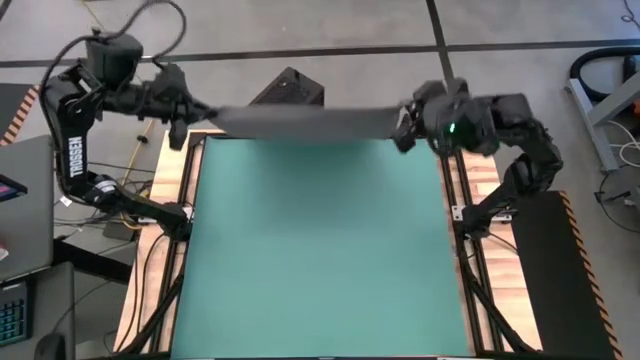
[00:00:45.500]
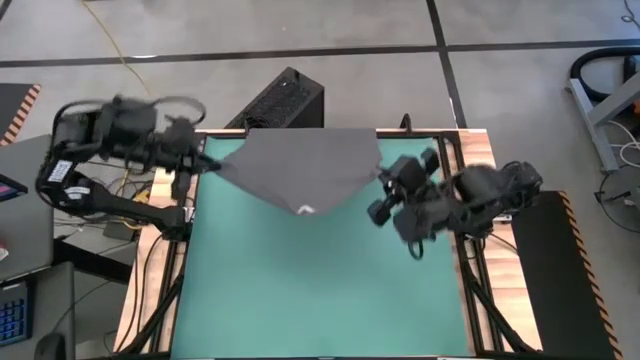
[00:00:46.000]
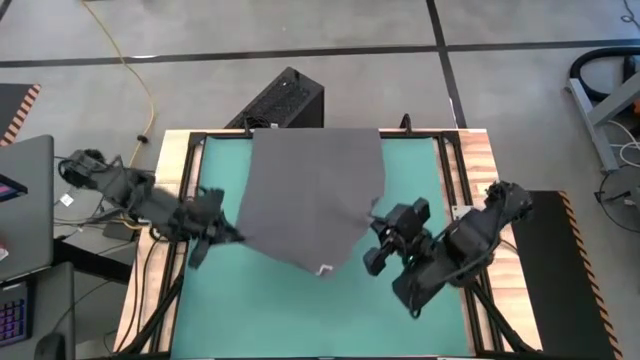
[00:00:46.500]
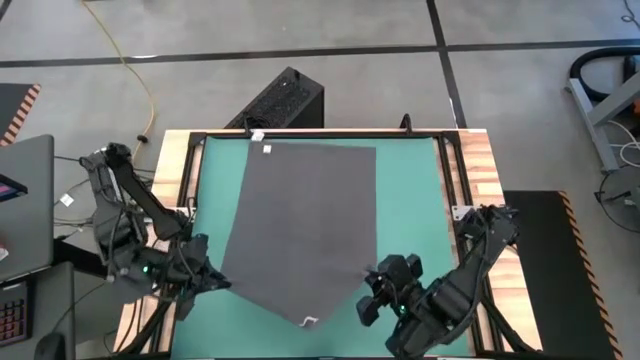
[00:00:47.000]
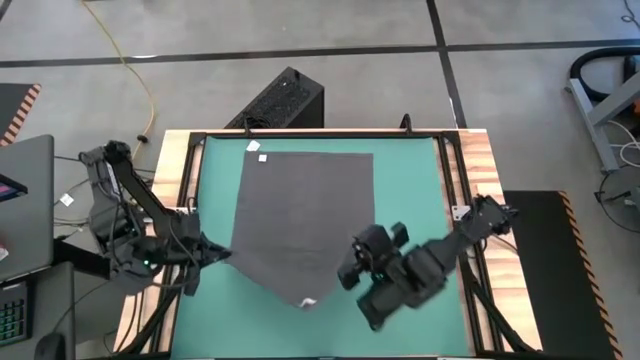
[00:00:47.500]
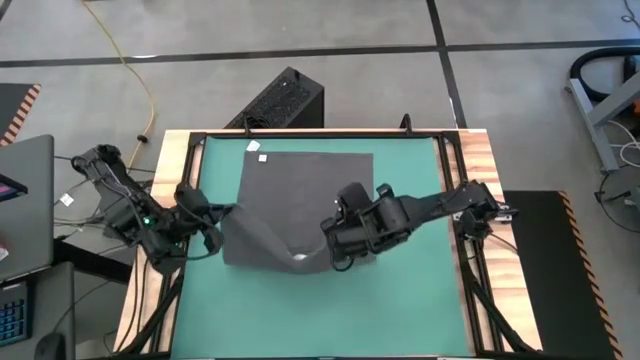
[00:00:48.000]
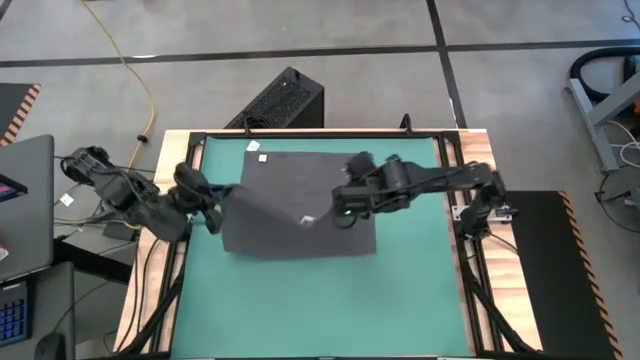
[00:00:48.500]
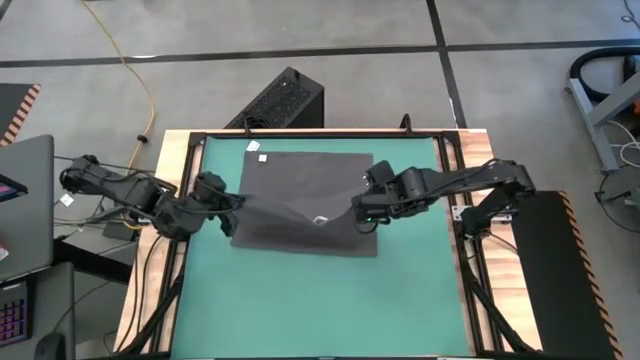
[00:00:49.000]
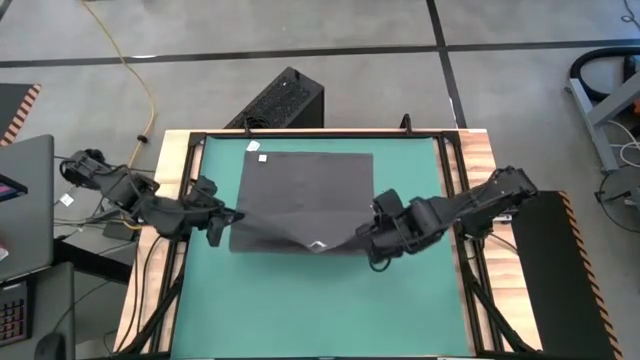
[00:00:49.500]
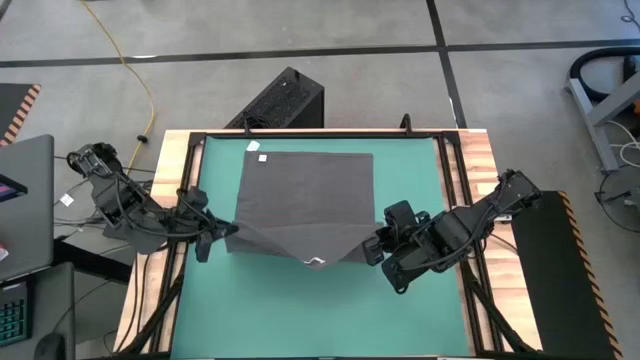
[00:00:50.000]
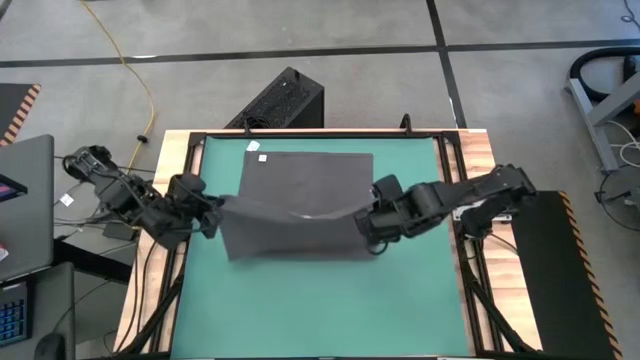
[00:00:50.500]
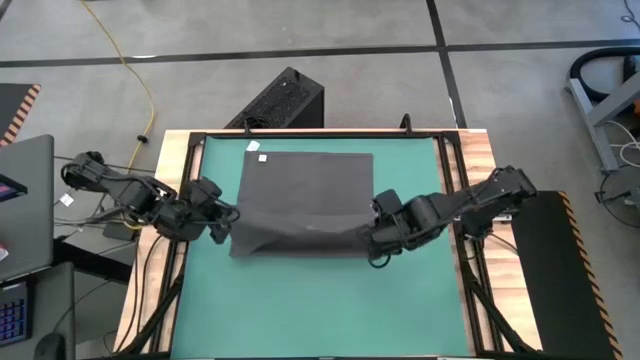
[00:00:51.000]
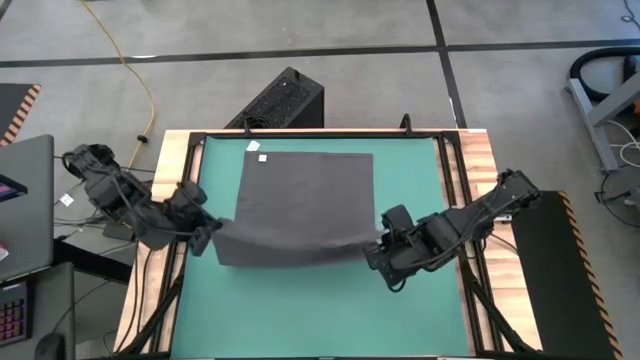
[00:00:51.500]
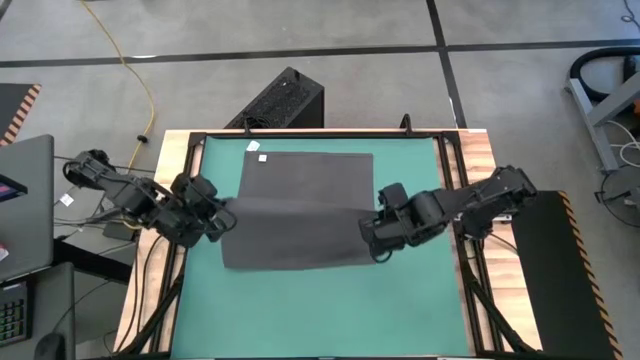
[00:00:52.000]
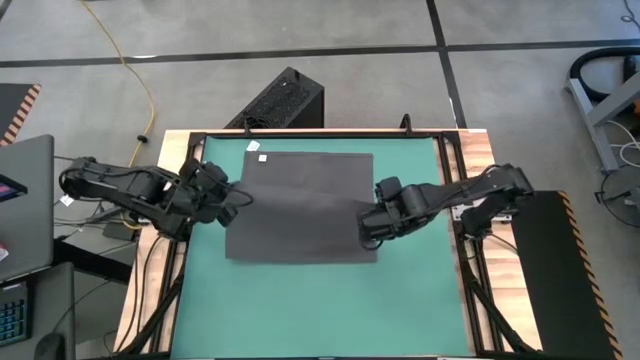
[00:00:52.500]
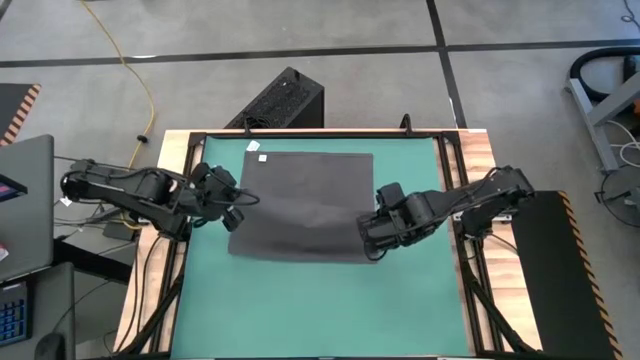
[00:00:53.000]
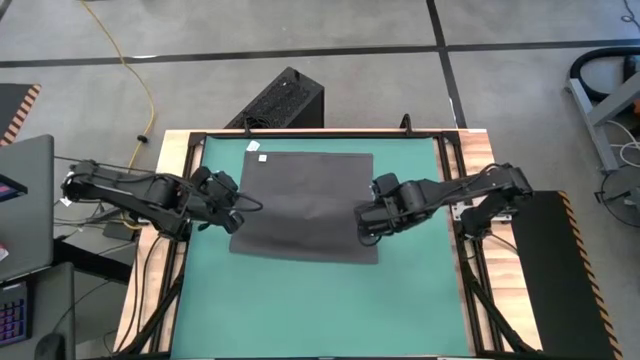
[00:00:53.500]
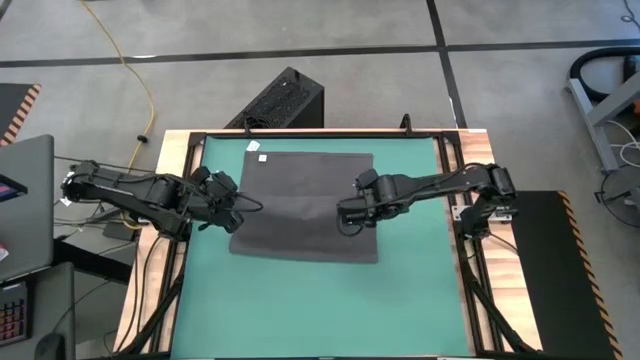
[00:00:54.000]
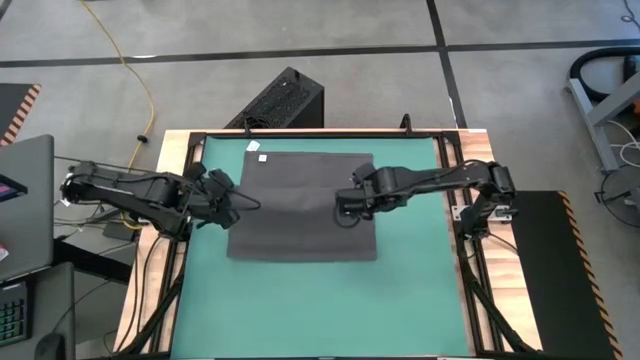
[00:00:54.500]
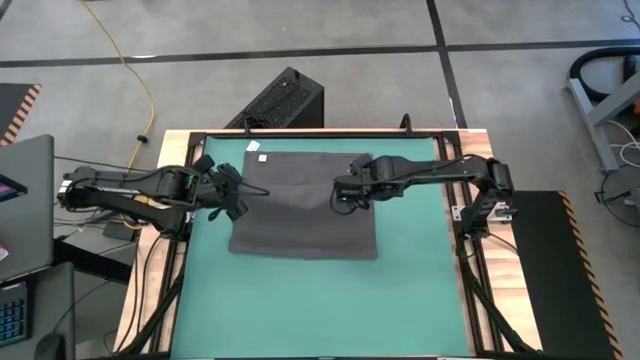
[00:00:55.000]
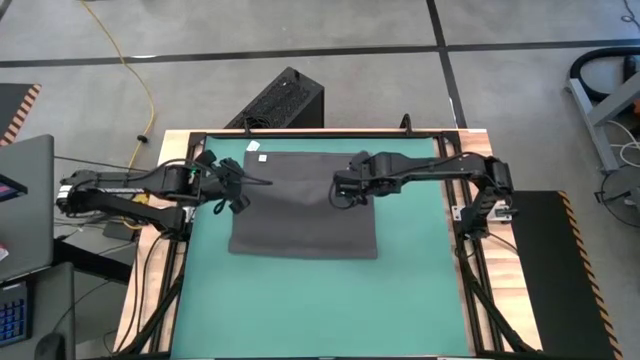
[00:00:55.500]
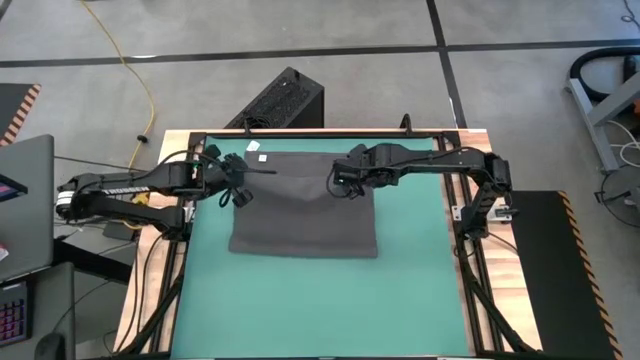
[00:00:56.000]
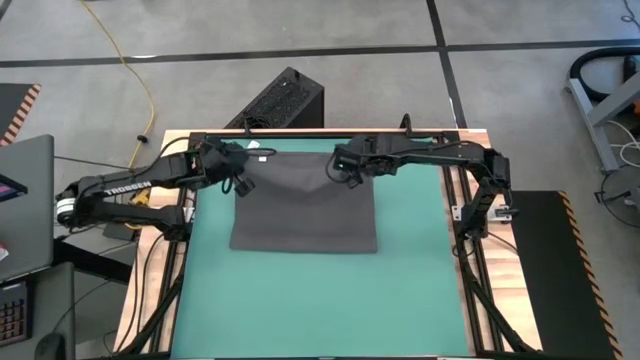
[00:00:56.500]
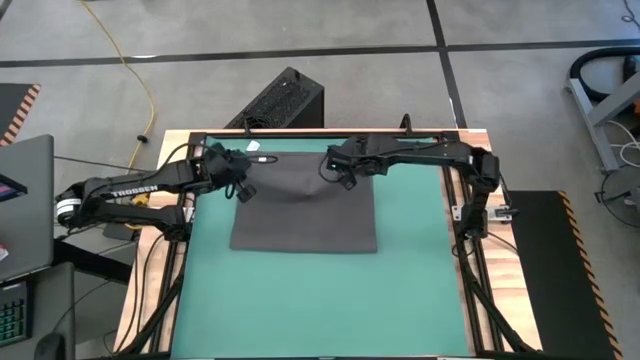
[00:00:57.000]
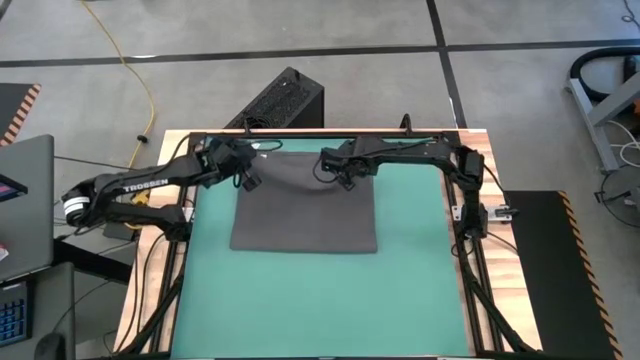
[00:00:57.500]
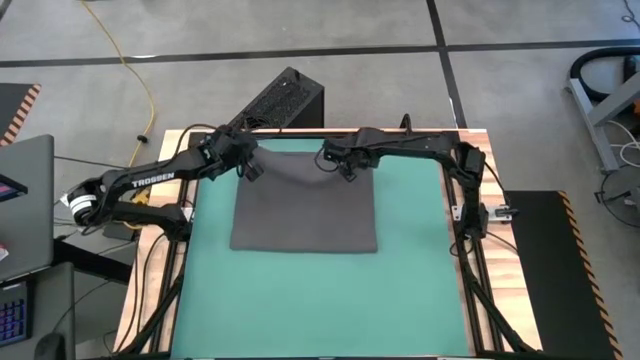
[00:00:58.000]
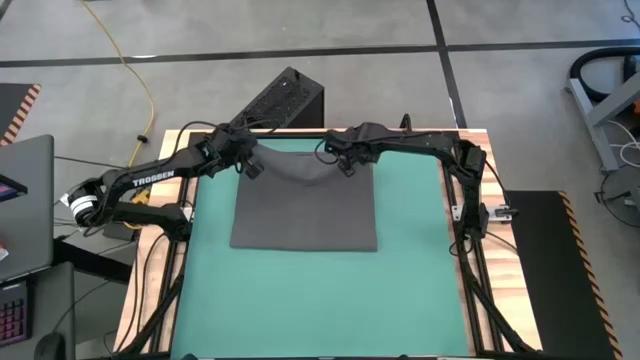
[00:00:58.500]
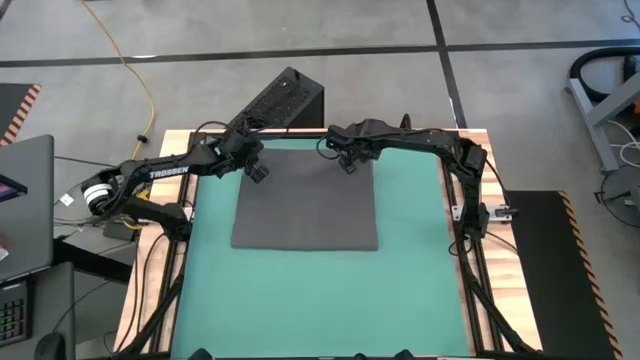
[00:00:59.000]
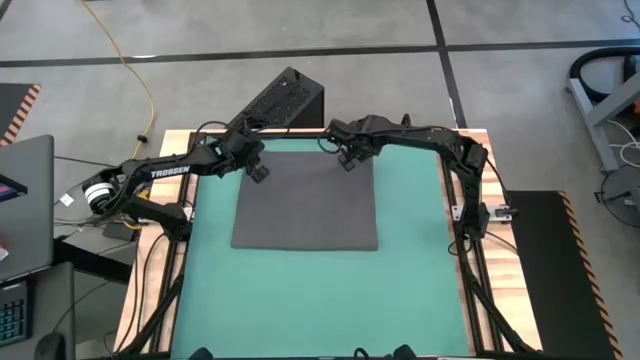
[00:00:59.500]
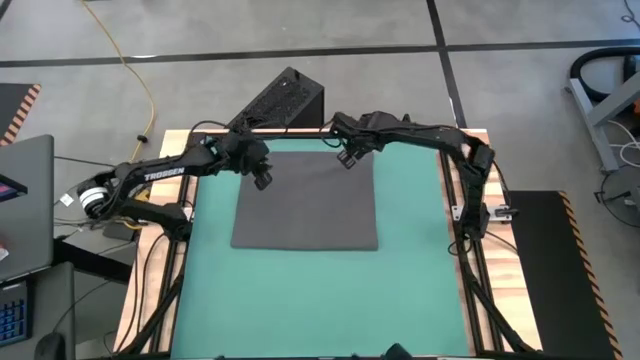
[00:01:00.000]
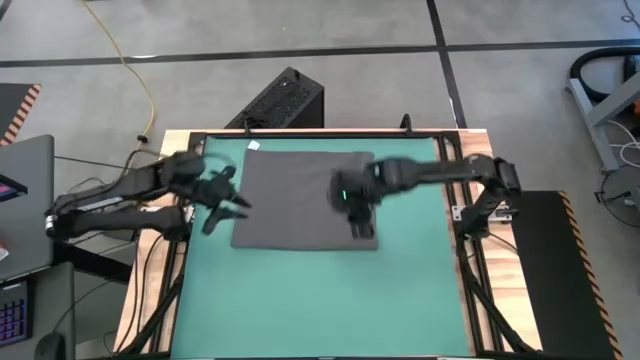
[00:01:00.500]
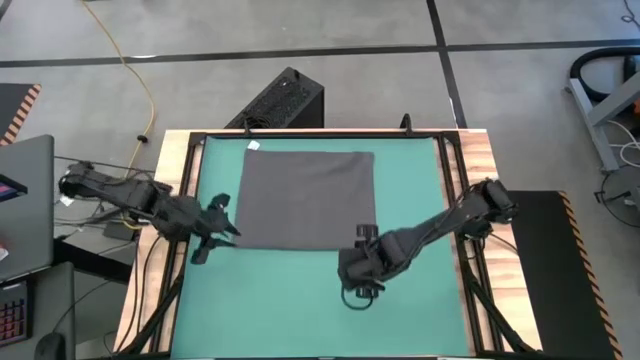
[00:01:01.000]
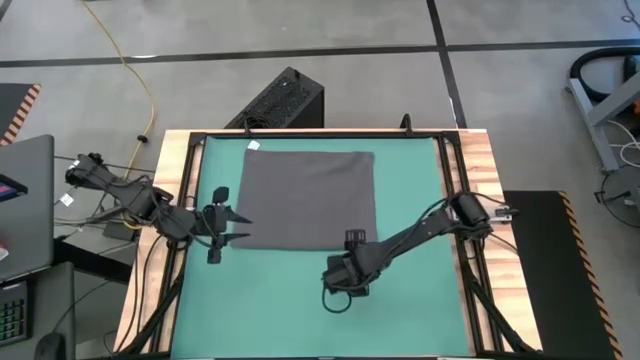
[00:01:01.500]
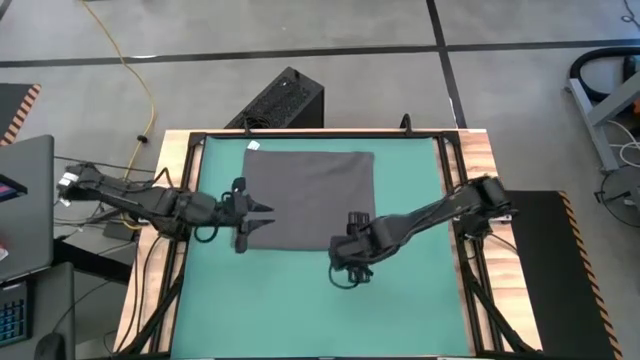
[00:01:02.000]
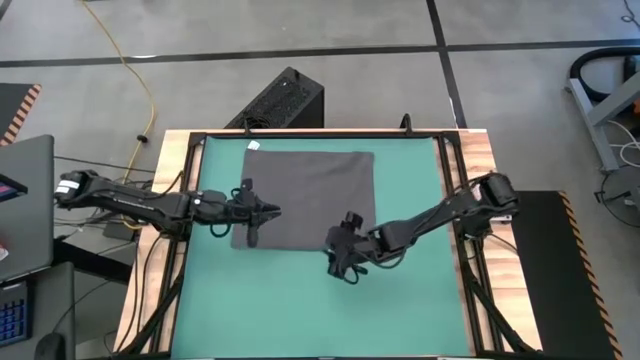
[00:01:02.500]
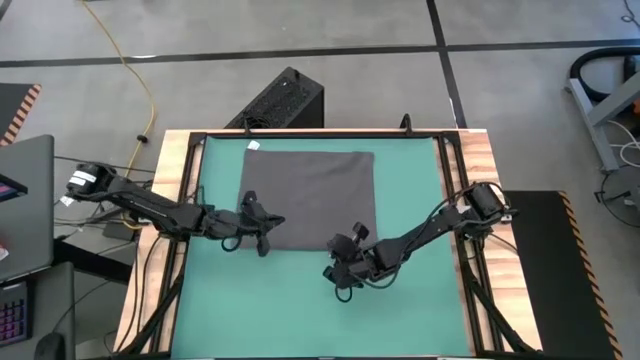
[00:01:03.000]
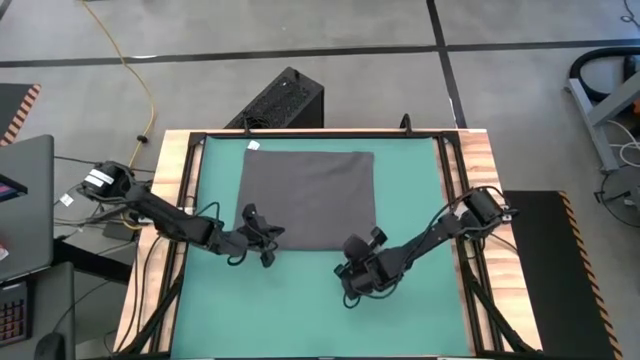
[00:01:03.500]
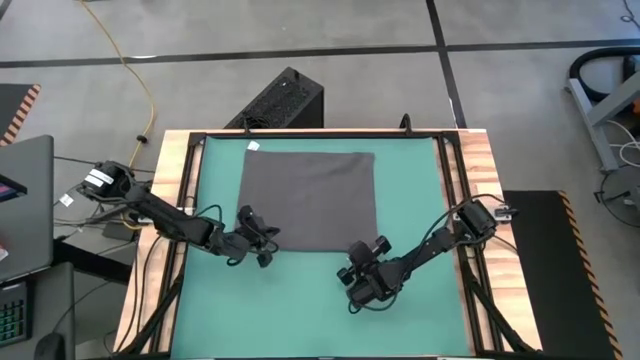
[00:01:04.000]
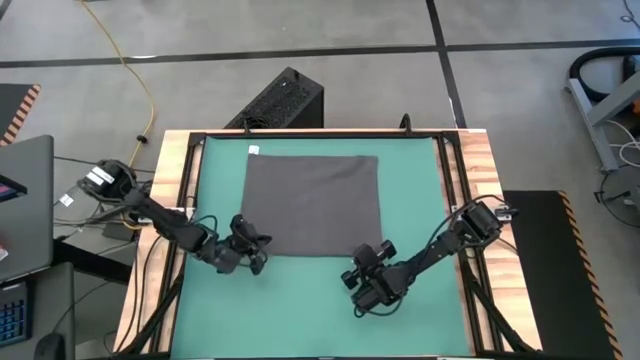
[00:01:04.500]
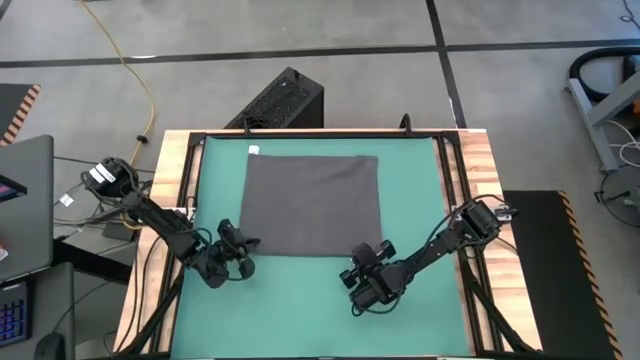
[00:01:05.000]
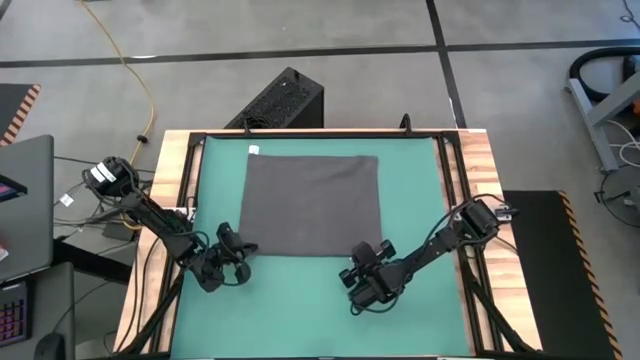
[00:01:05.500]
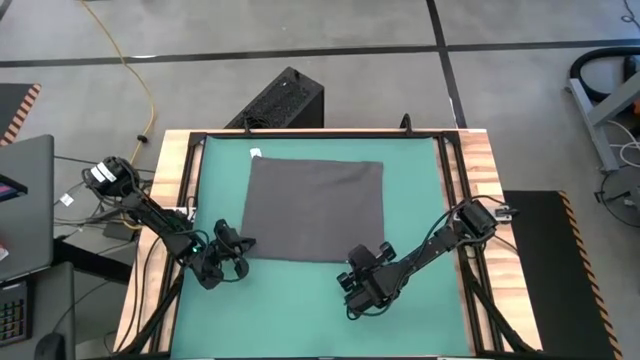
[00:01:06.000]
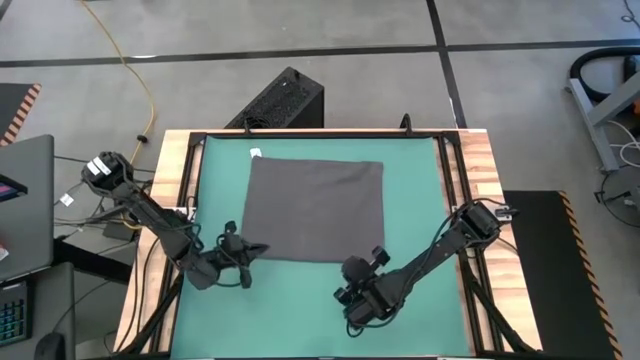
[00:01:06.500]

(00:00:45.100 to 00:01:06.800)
Task: Roll towel
Fold the microfiber towel
